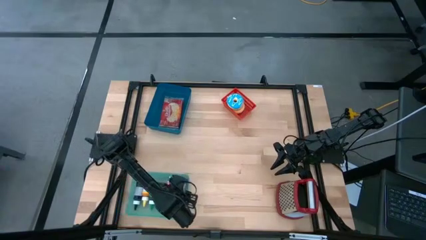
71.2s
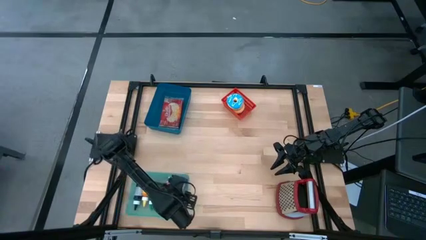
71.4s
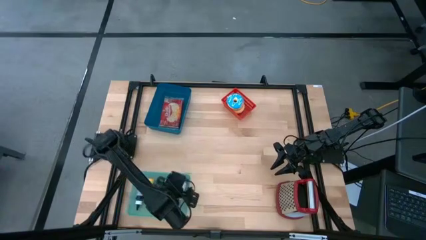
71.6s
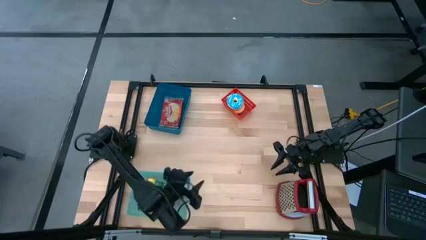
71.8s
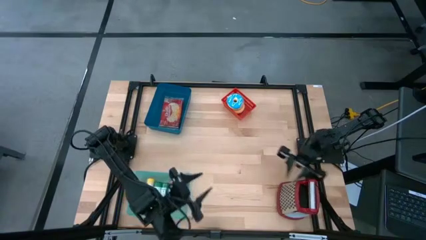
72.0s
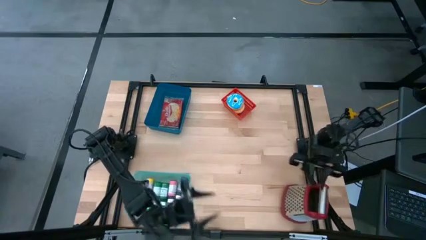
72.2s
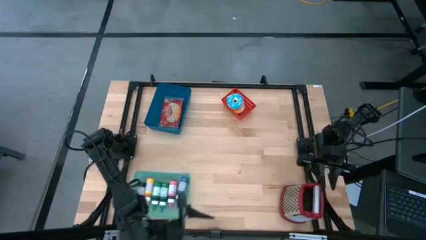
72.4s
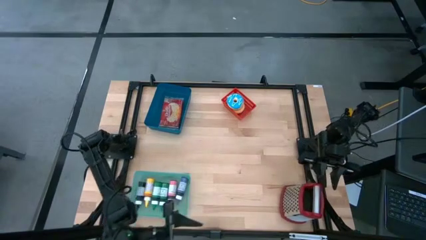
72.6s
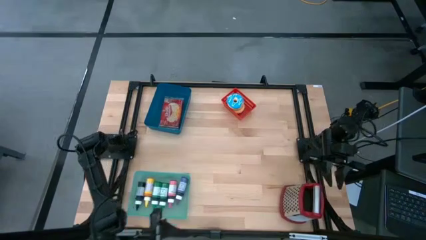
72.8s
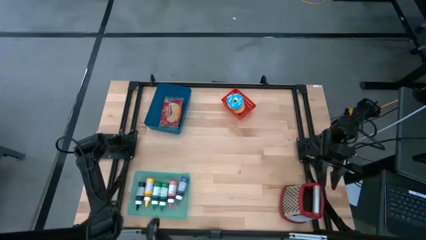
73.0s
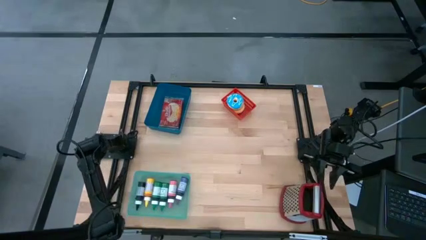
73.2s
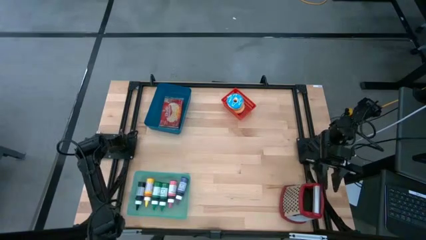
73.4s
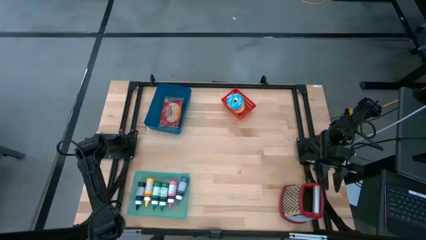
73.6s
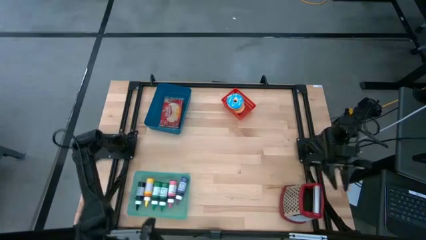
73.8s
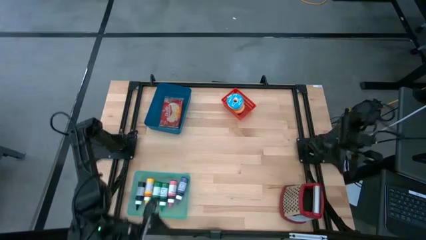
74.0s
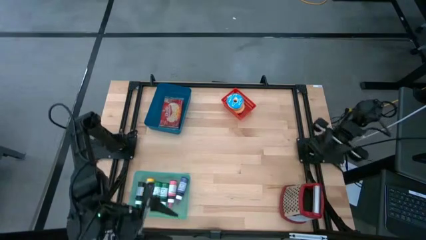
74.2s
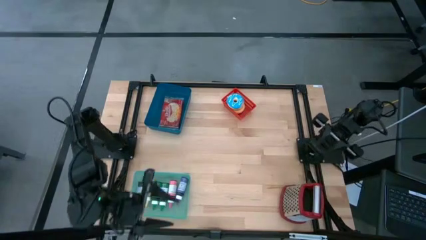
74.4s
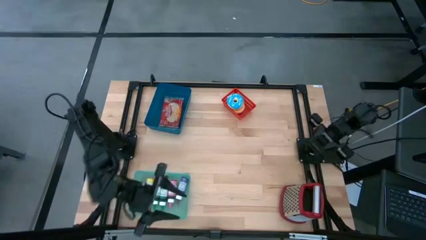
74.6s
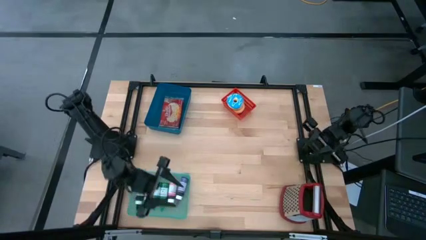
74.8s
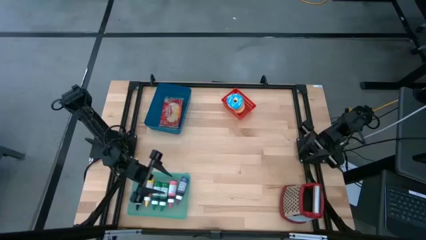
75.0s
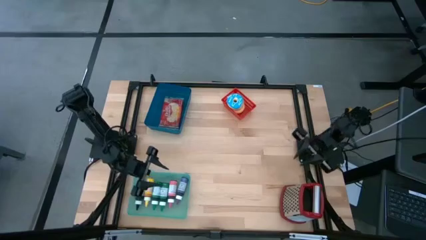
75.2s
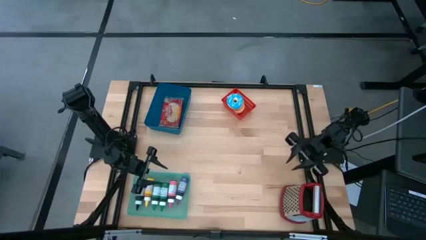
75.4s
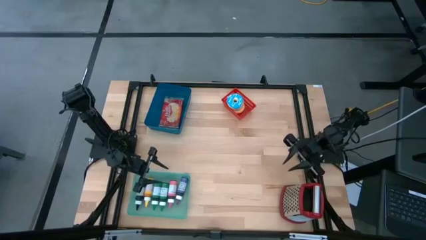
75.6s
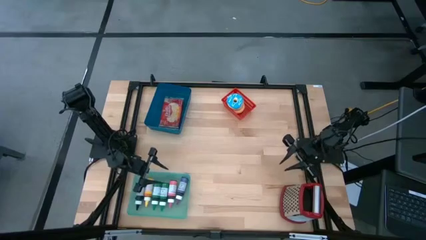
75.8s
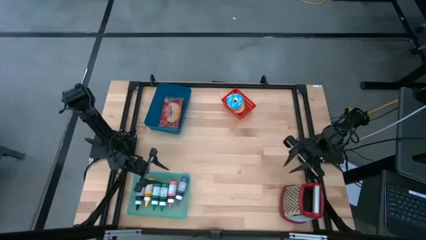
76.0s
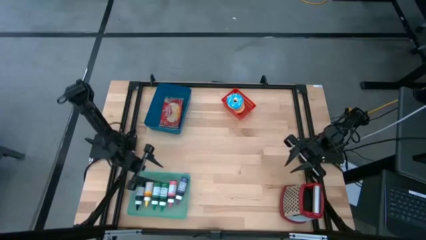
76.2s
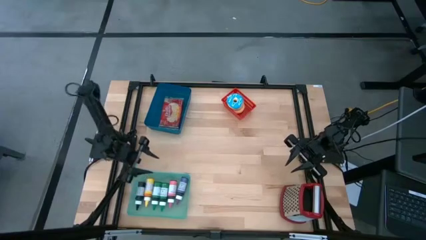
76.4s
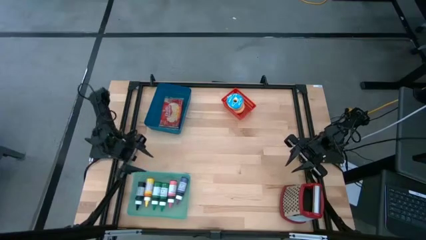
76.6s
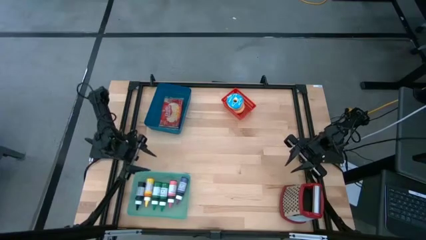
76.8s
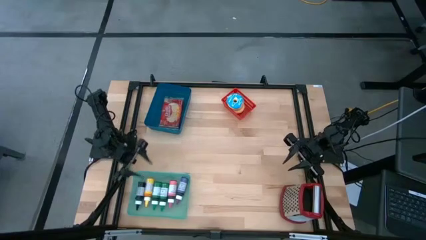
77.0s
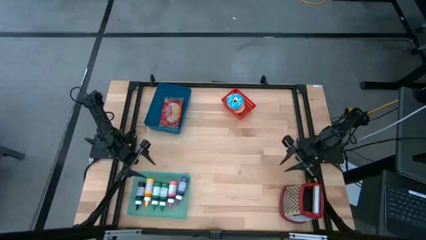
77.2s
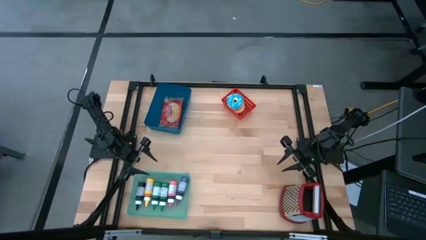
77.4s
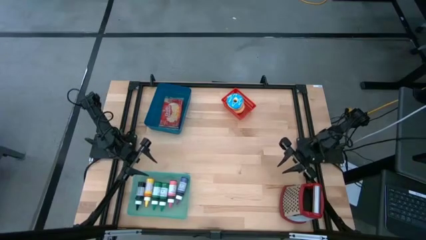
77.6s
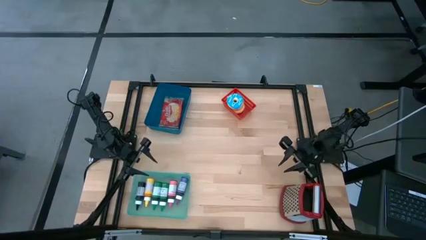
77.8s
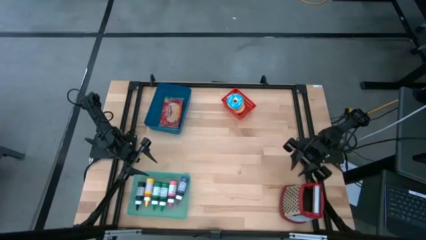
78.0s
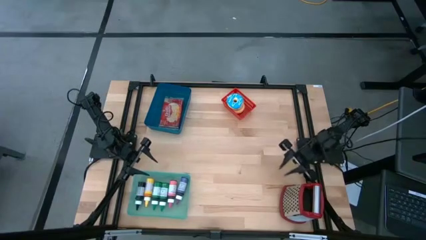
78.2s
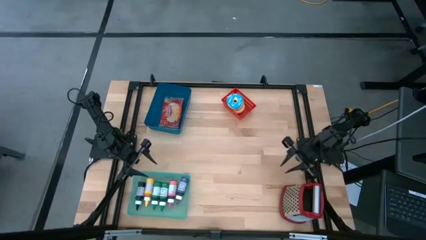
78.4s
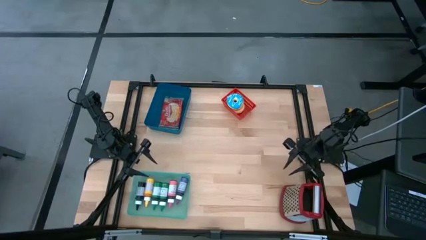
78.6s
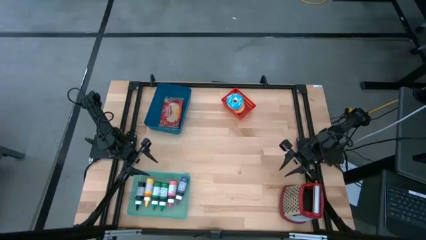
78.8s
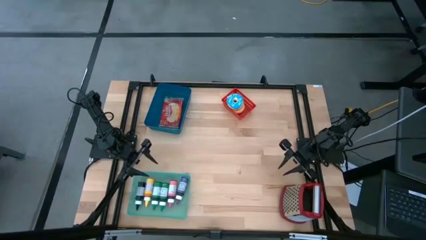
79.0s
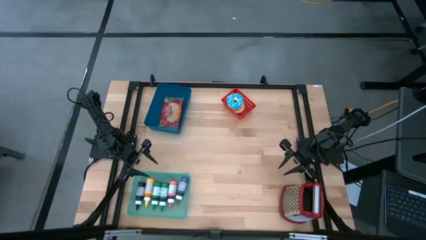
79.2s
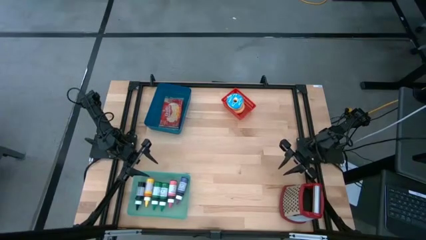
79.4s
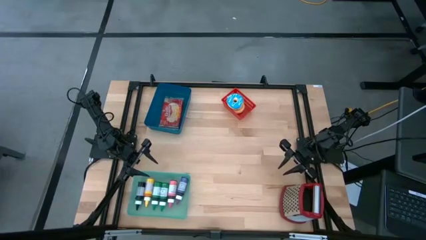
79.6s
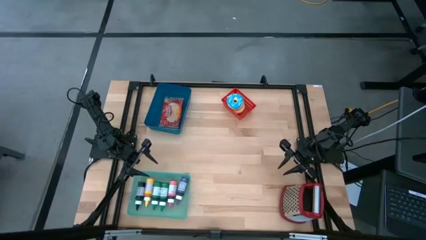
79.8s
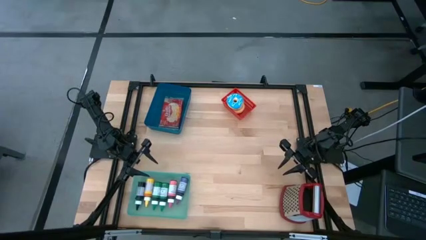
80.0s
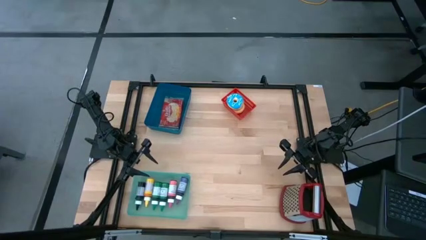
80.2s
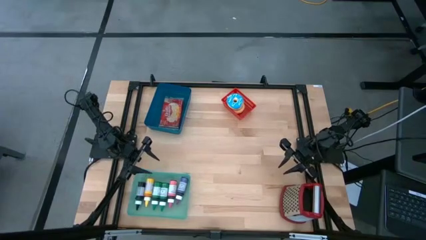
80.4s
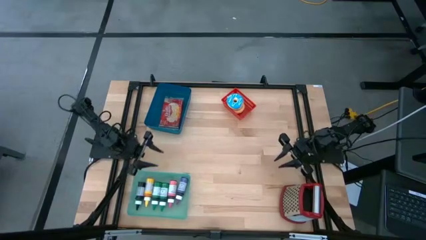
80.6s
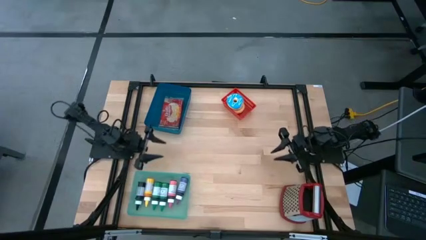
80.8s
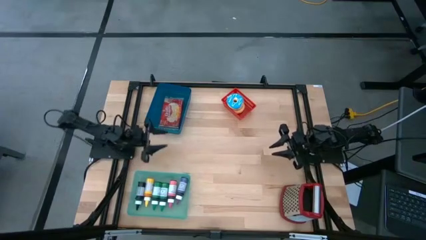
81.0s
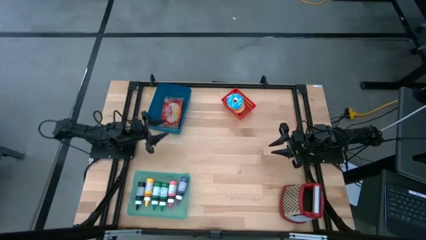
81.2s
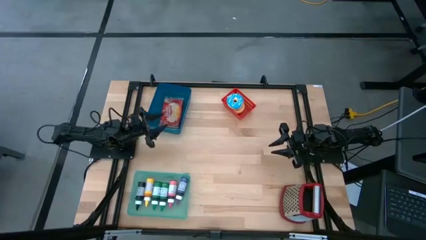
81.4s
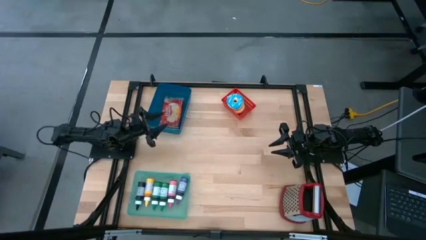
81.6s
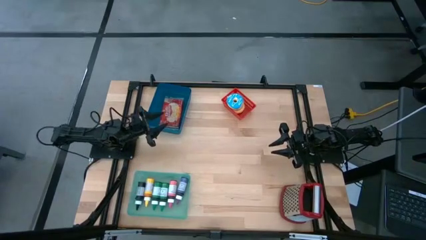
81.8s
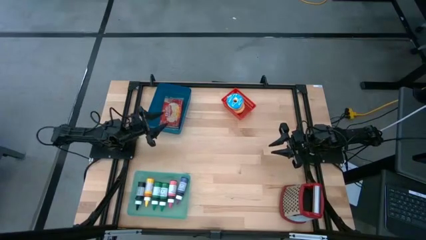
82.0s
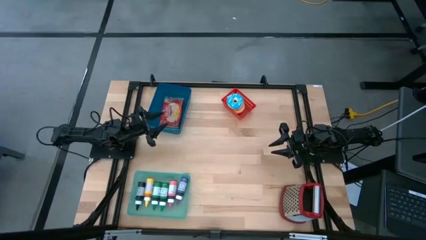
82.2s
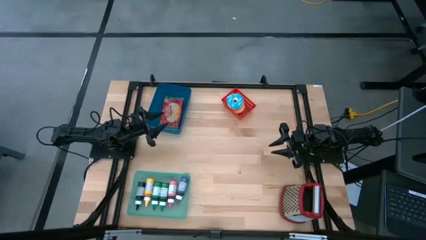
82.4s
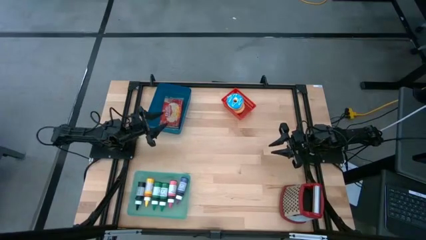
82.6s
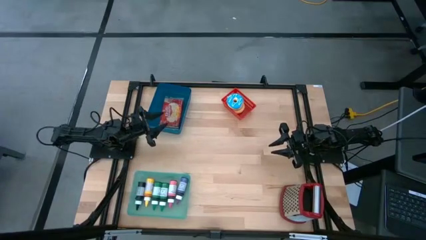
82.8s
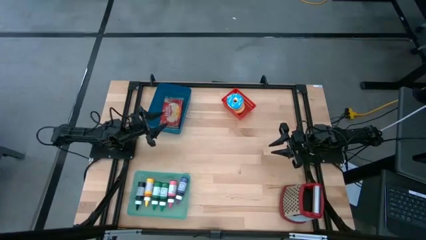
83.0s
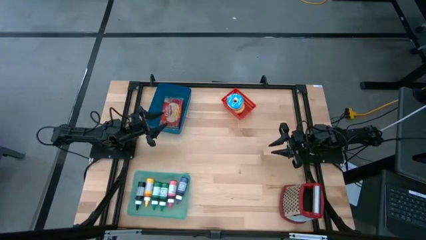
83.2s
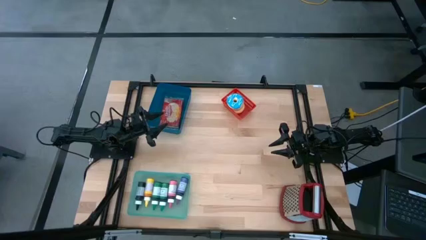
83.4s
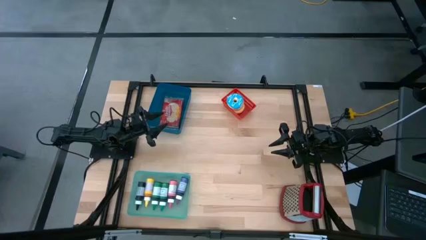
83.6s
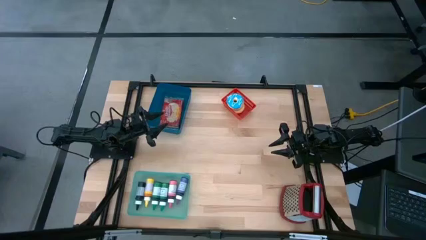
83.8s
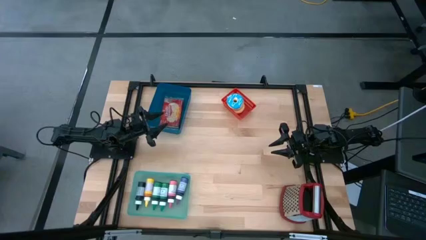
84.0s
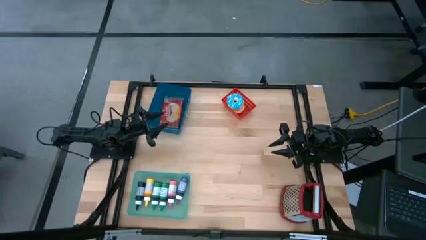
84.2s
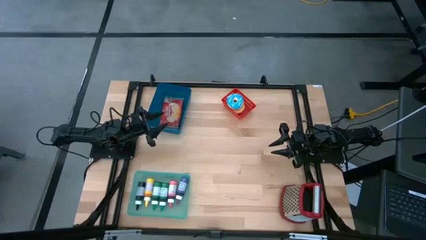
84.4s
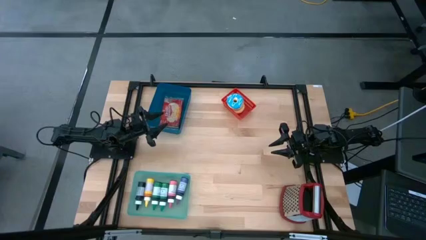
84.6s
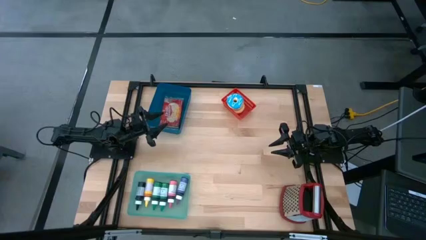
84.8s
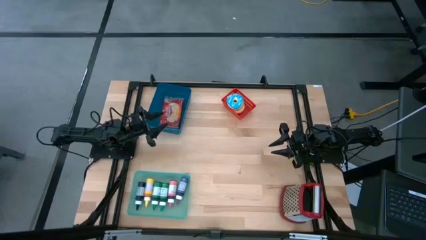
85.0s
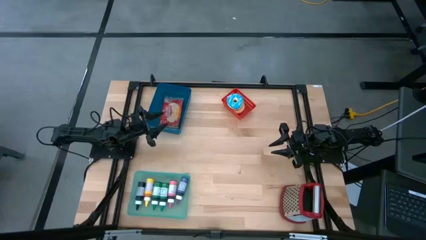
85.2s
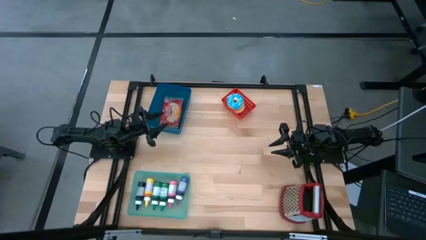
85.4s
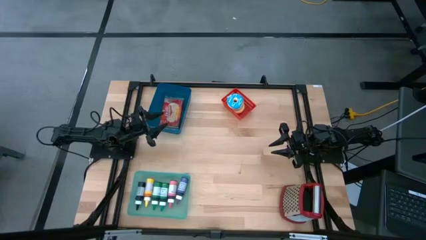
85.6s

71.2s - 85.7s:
Return to Home Position
